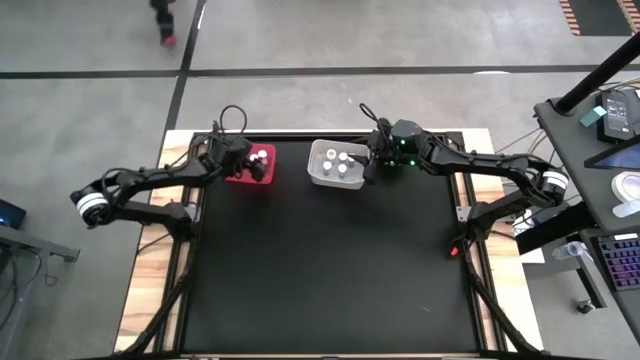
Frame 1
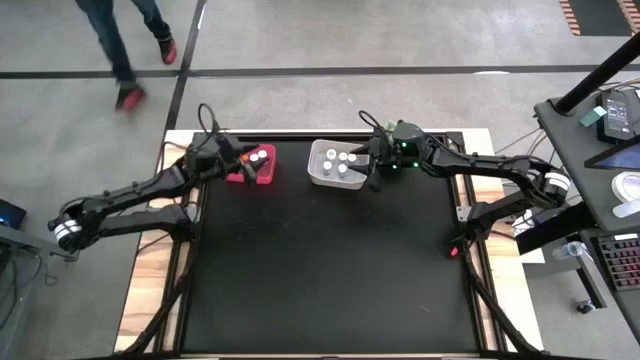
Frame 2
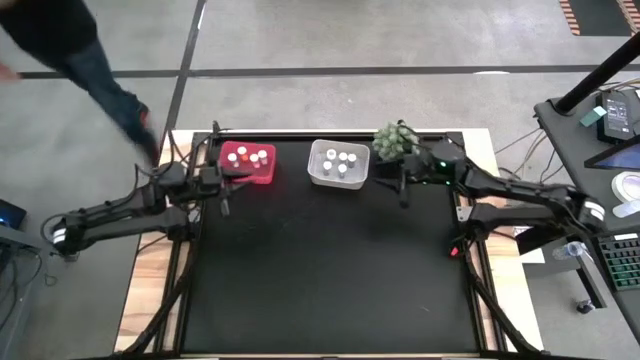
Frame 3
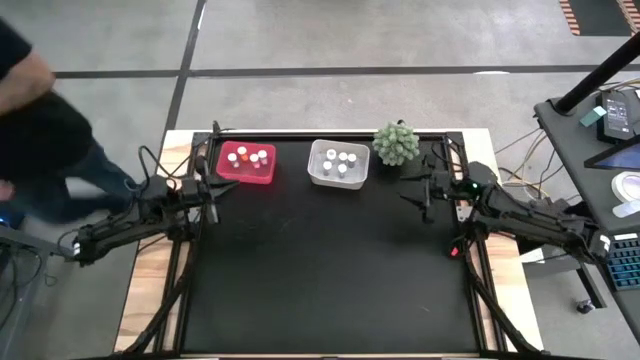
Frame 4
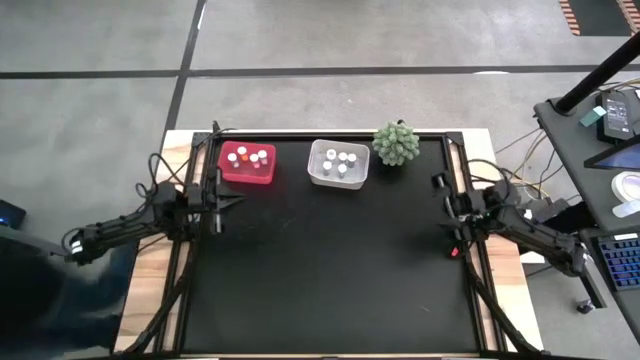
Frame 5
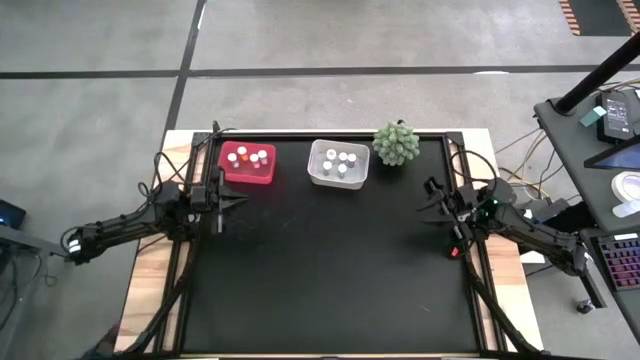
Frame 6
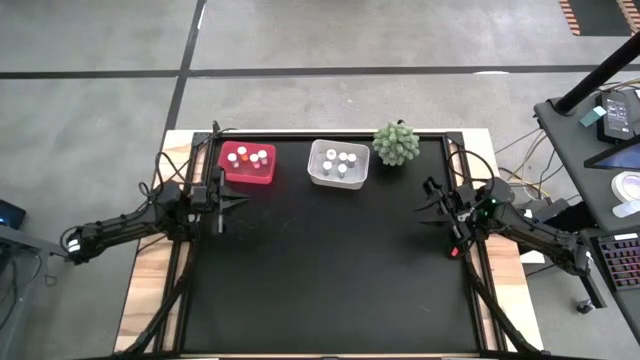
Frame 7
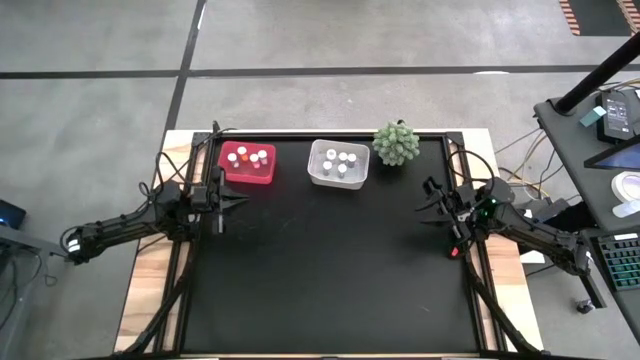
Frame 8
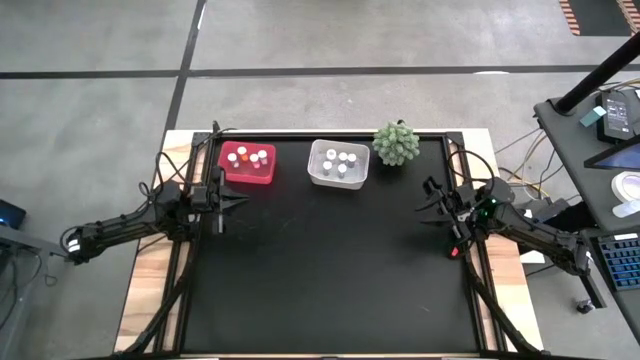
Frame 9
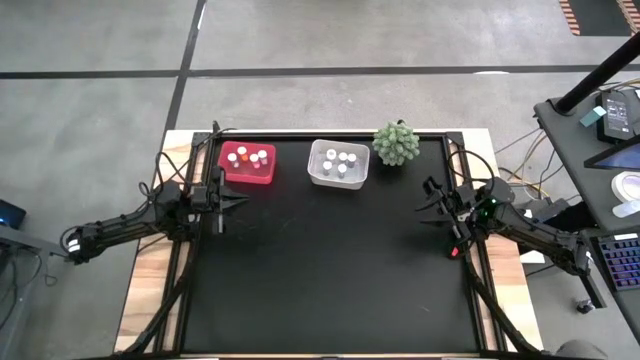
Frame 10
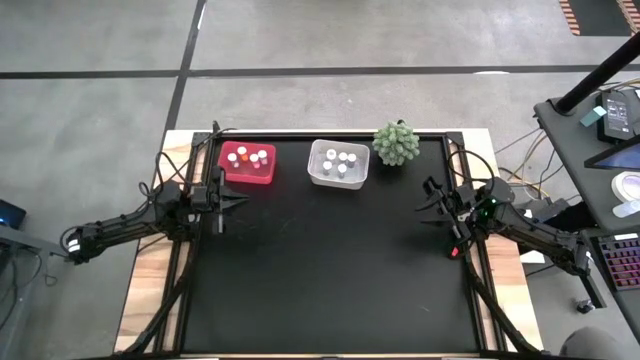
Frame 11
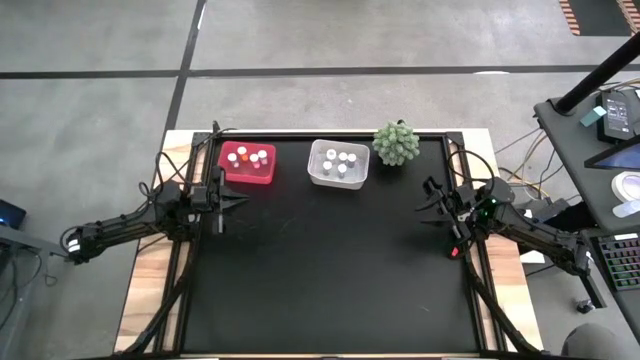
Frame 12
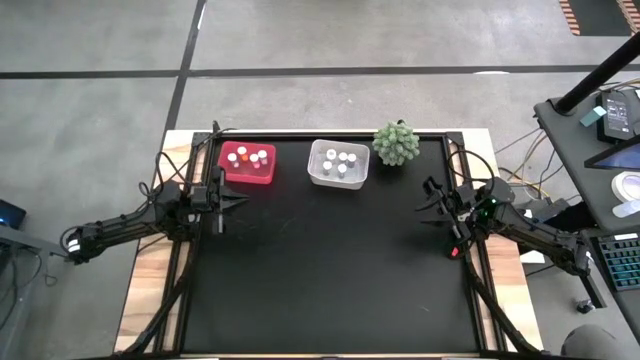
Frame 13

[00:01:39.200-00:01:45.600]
Task: Pick and place medicine bottles into bin by pill shape (circle, oval)
Return to Home Position

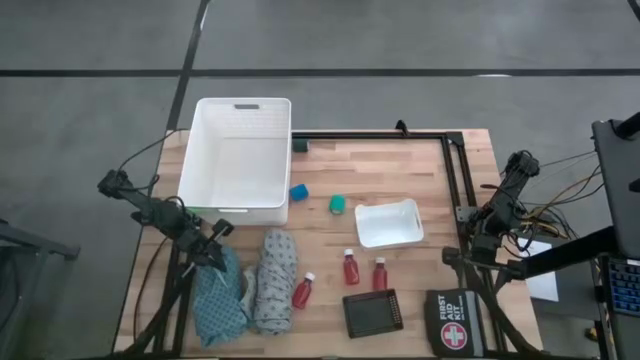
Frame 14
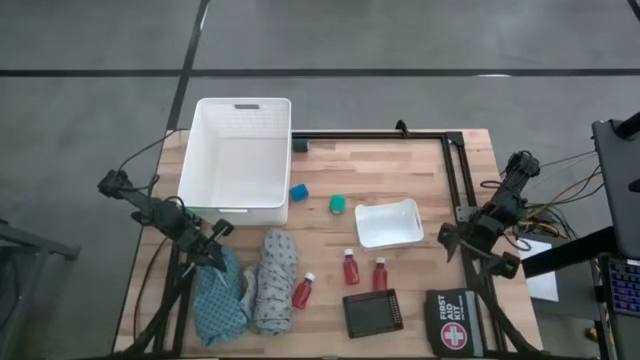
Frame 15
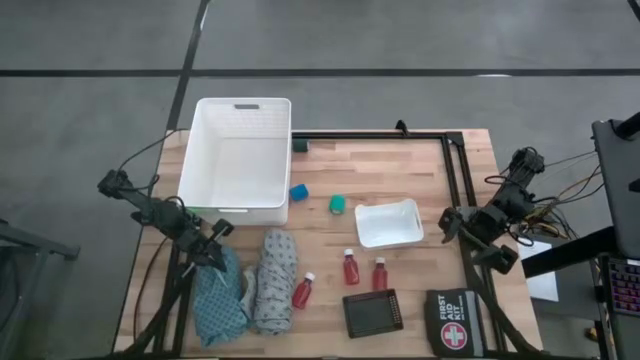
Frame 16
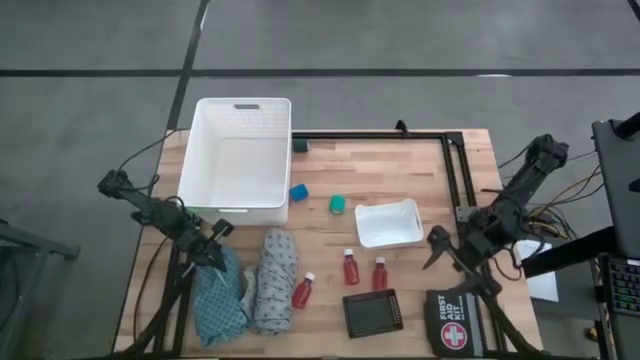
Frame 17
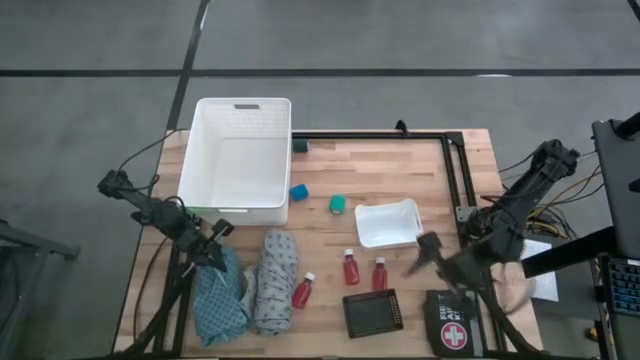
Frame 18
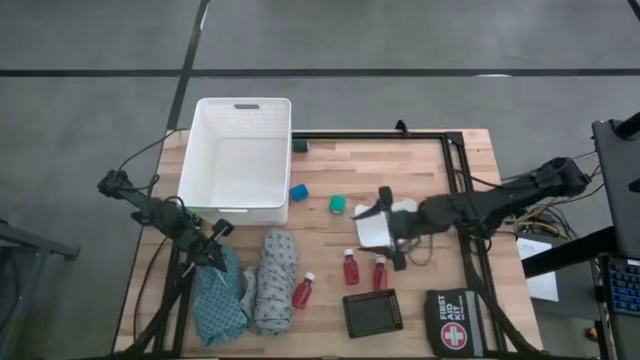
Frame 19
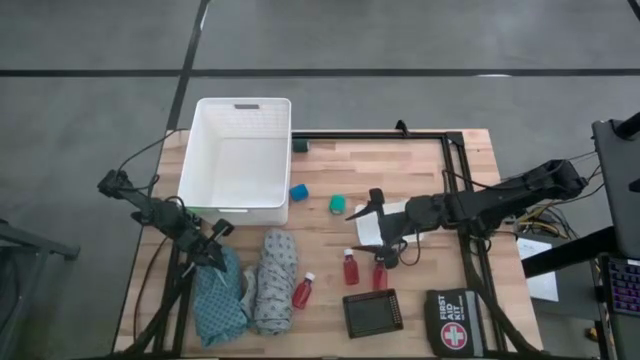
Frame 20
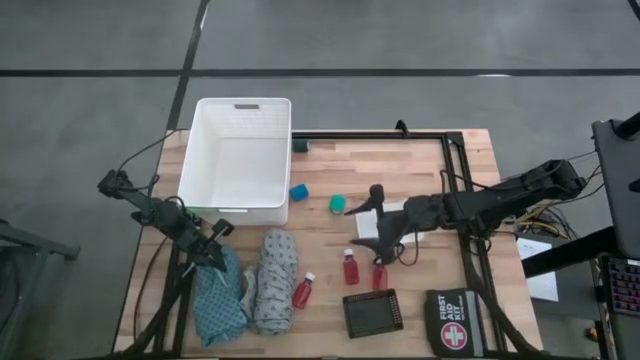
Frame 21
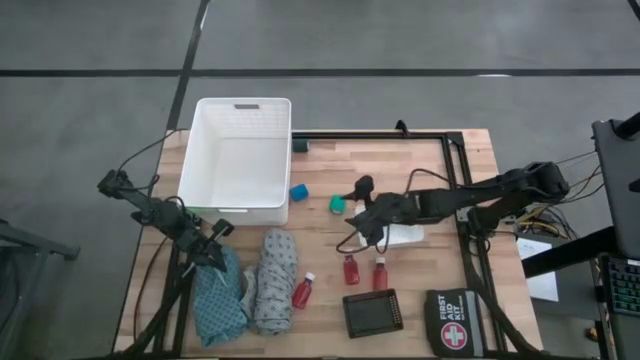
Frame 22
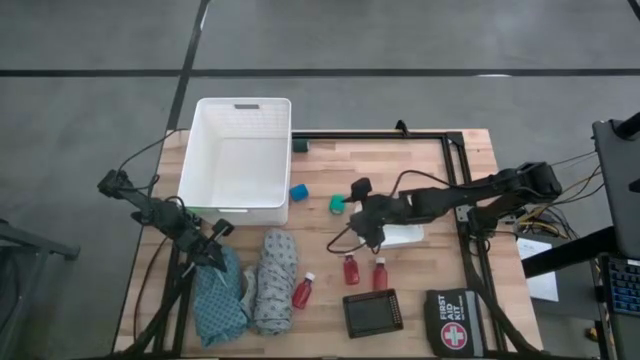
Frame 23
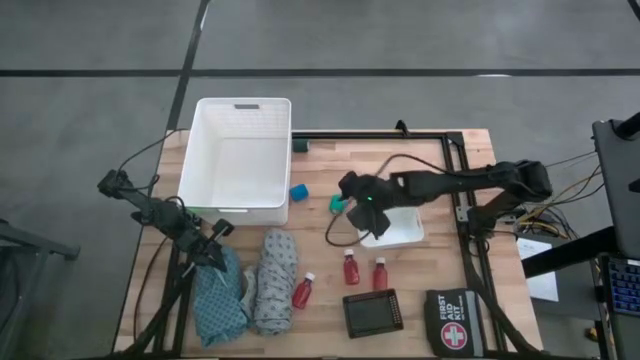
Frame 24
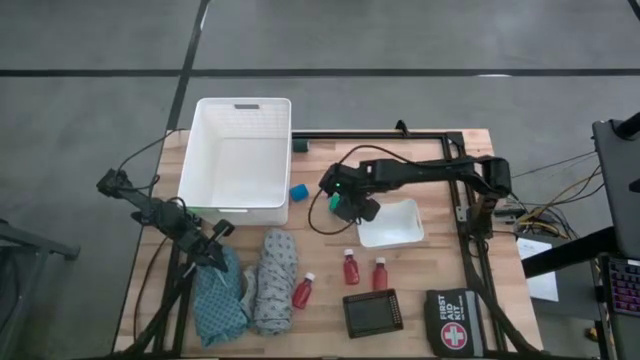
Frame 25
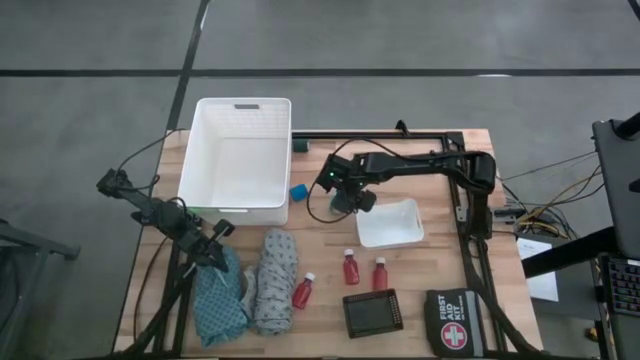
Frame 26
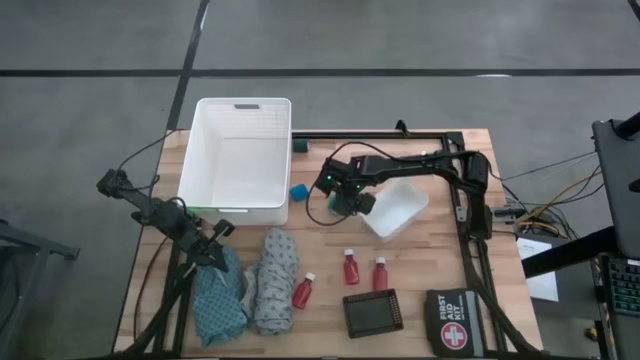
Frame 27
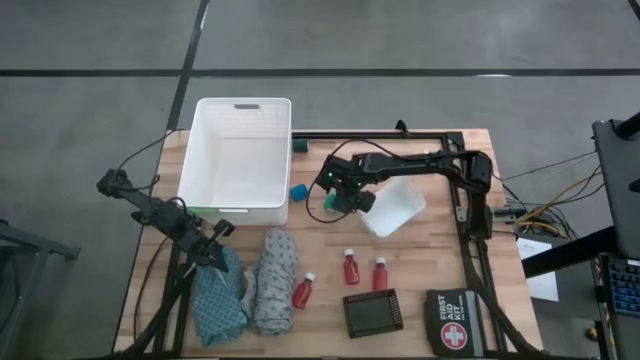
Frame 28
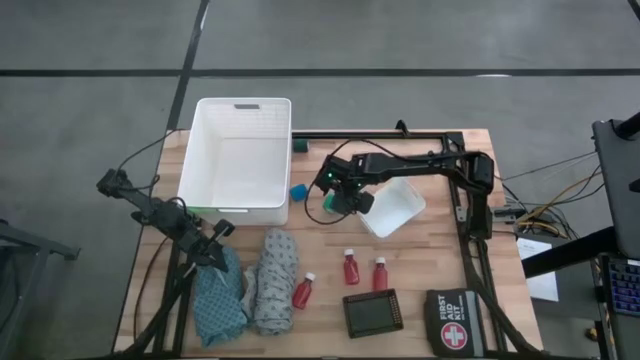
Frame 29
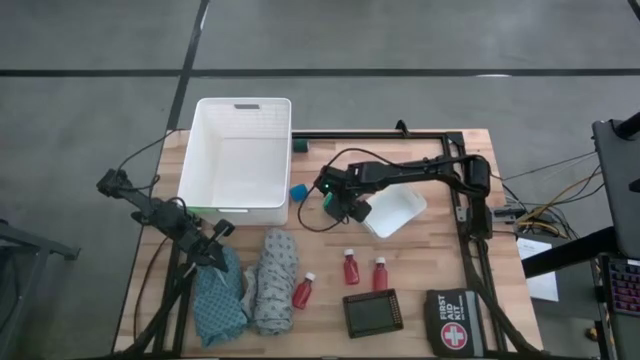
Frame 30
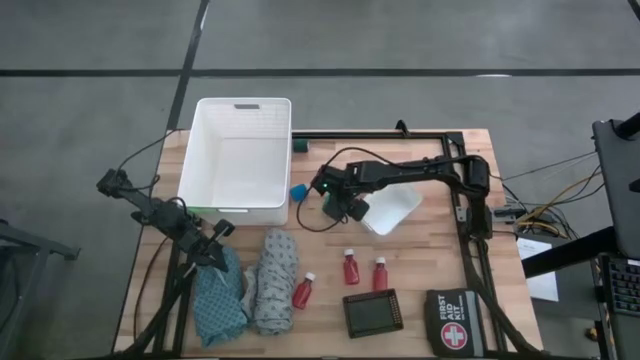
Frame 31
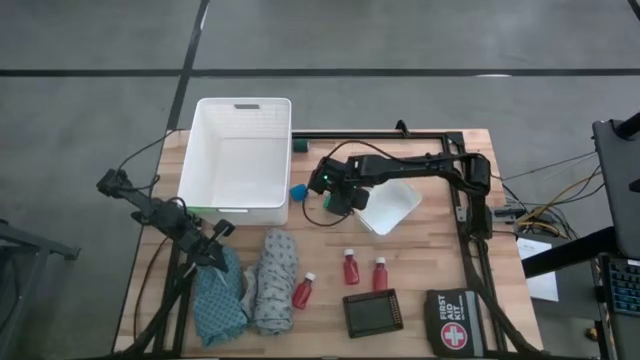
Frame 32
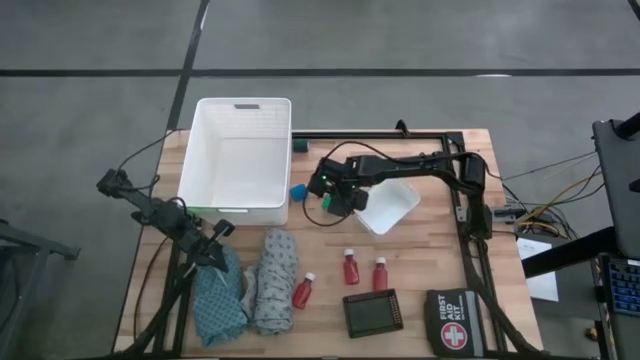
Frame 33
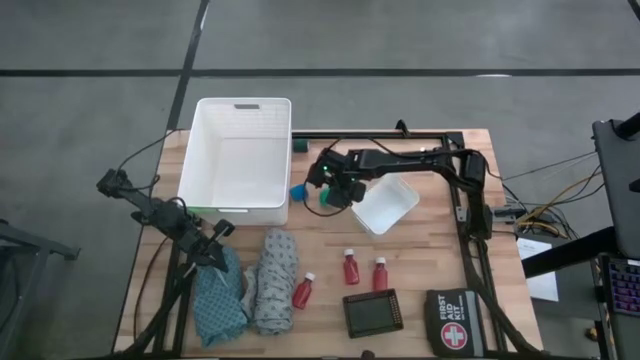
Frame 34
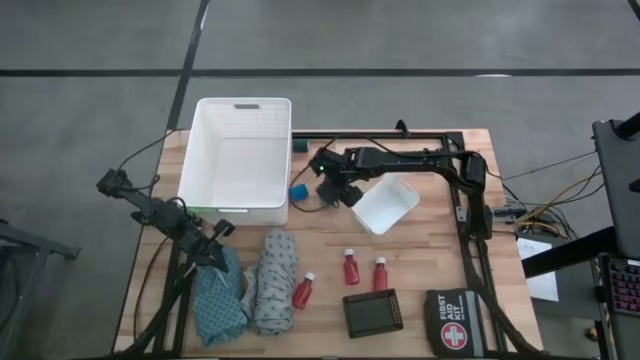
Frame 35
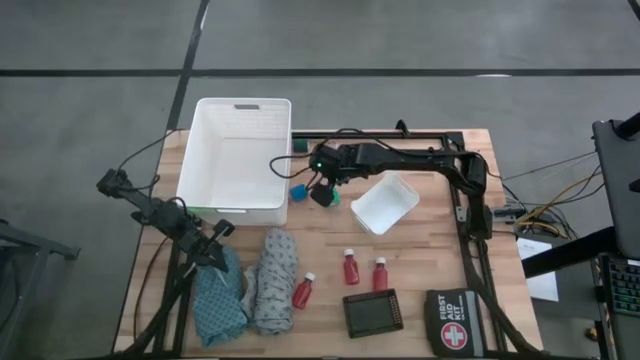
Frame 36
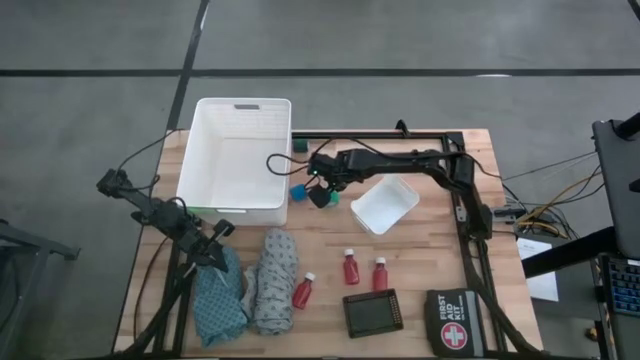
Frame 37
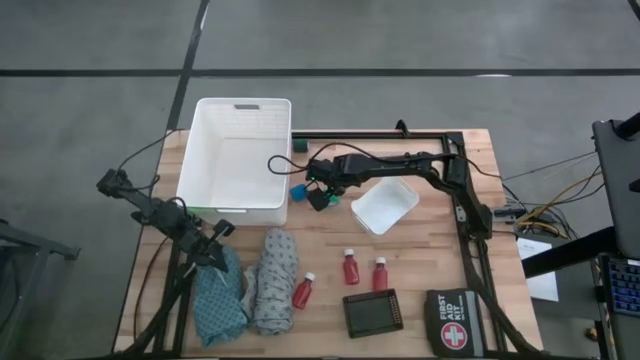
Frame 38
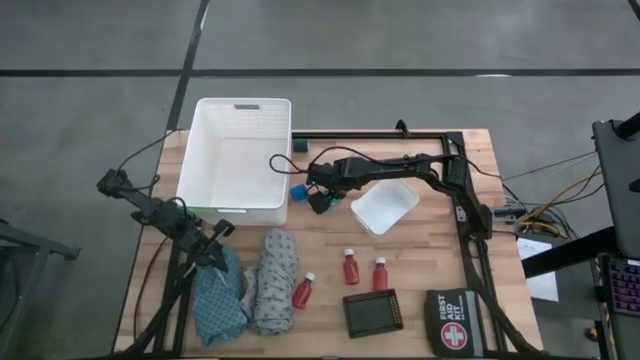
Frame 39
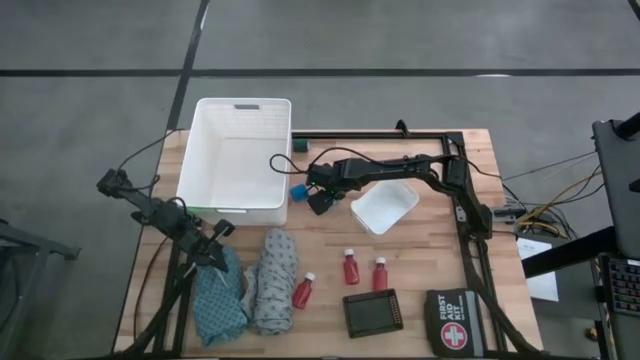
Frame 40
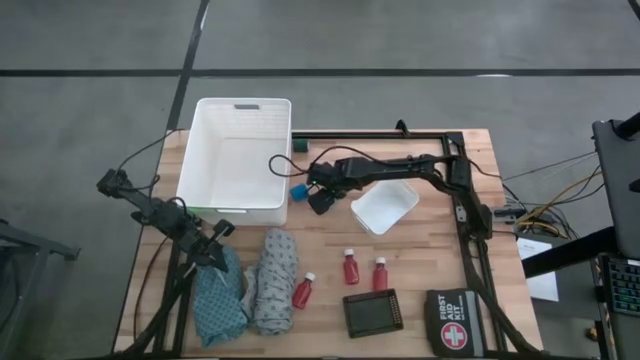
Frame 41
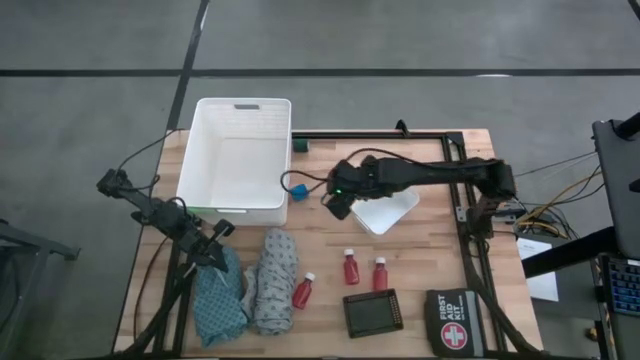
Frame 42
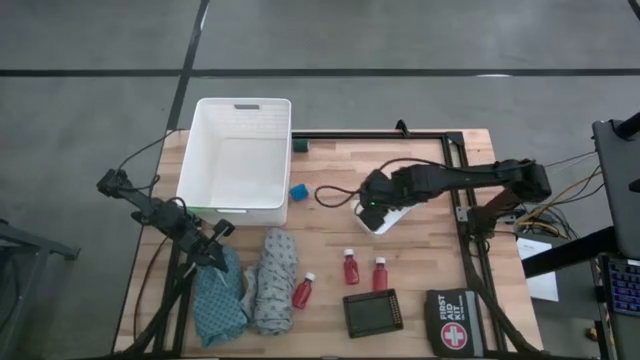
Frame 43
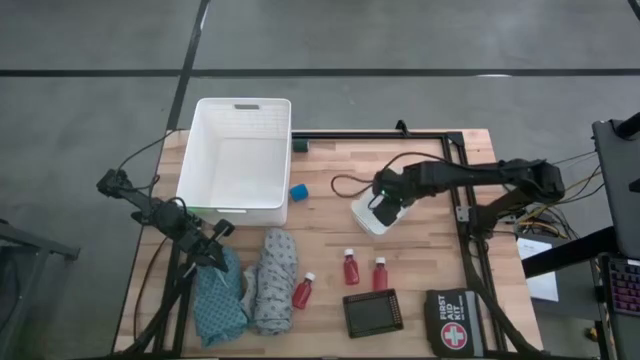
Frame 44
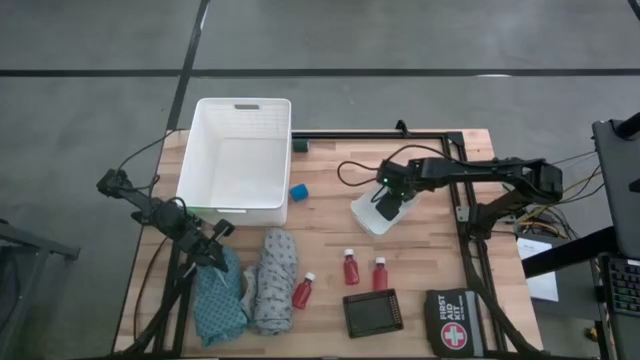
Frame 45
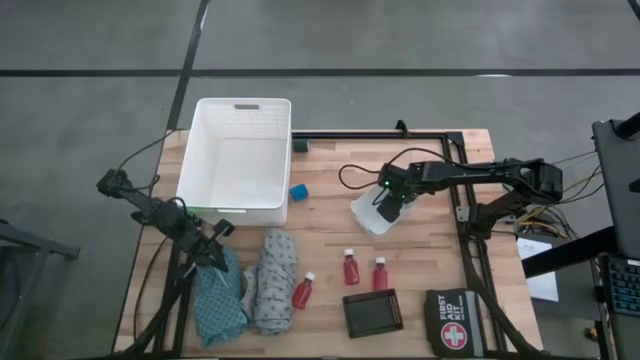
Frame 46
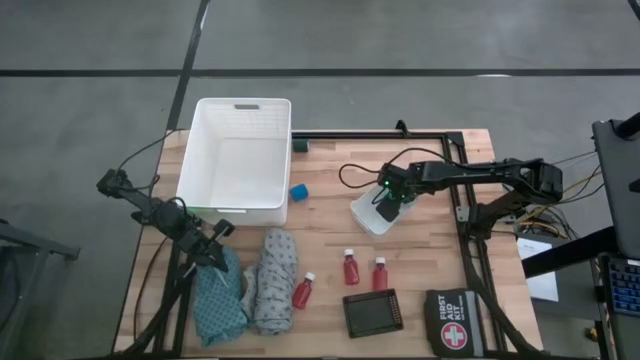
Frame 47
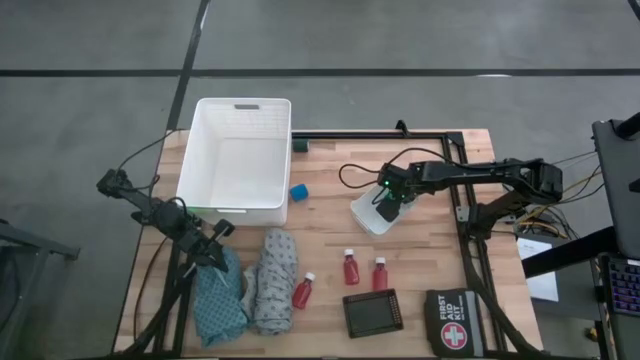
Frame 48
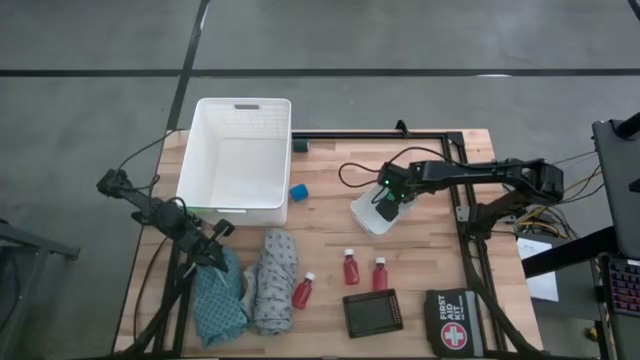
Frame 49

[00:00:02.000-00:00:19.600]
Task: Pick & place medical supplies in basket/bin
Put the light green bandage into the small white bin
